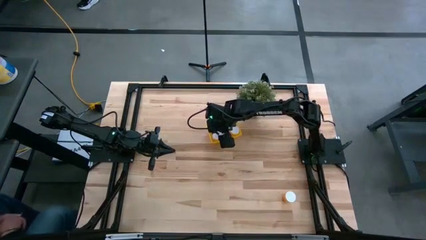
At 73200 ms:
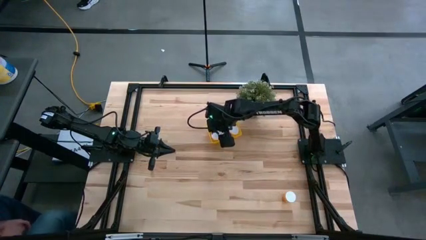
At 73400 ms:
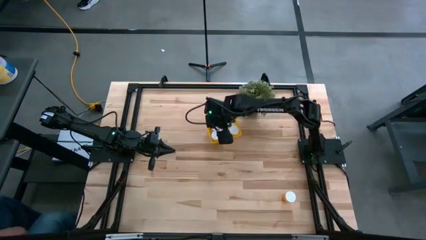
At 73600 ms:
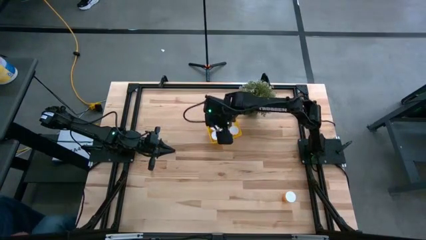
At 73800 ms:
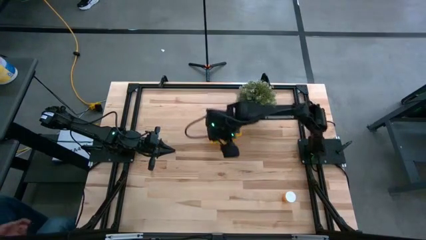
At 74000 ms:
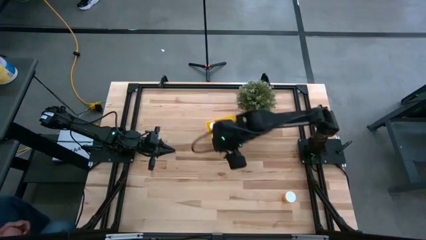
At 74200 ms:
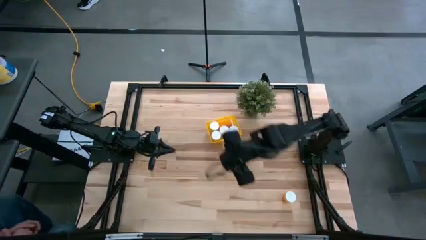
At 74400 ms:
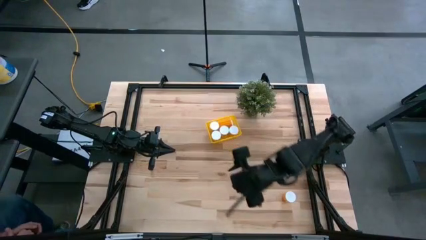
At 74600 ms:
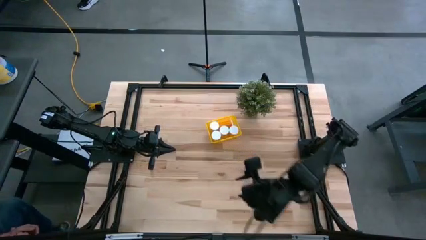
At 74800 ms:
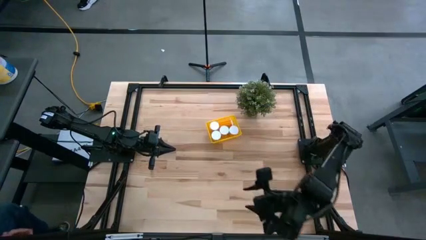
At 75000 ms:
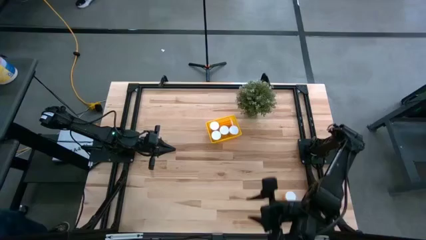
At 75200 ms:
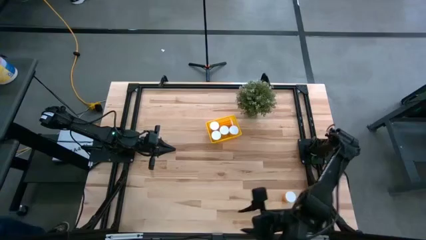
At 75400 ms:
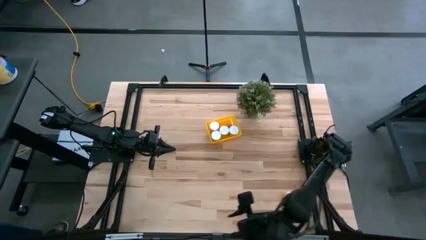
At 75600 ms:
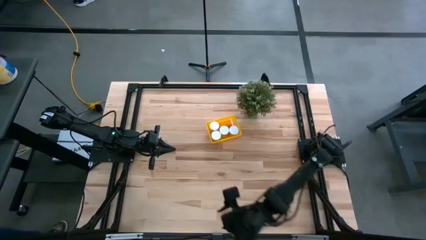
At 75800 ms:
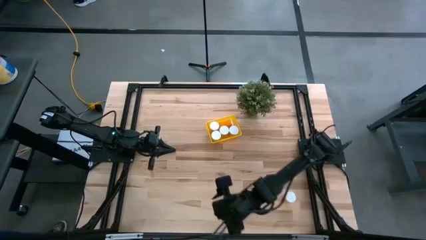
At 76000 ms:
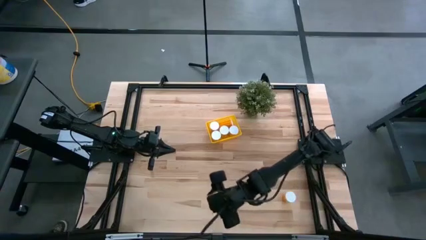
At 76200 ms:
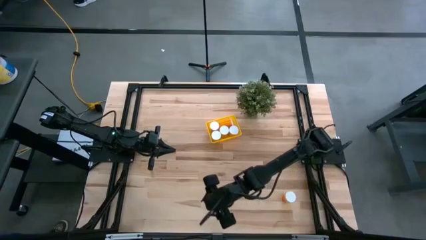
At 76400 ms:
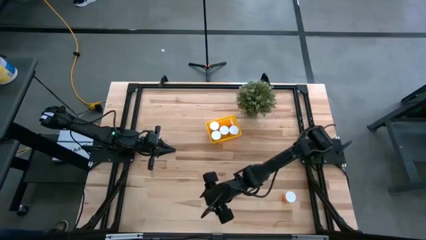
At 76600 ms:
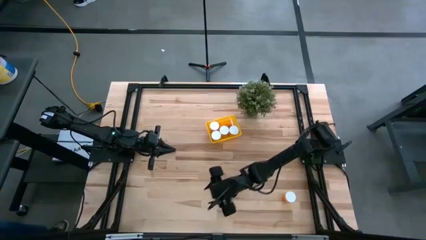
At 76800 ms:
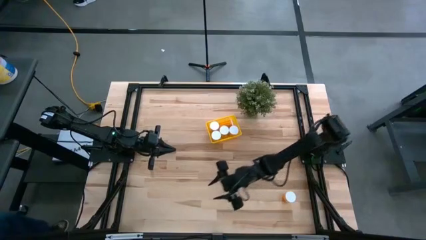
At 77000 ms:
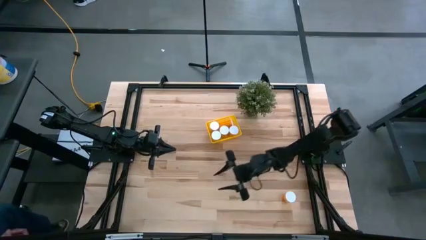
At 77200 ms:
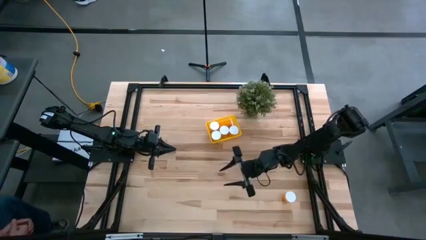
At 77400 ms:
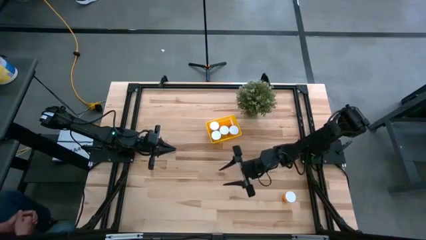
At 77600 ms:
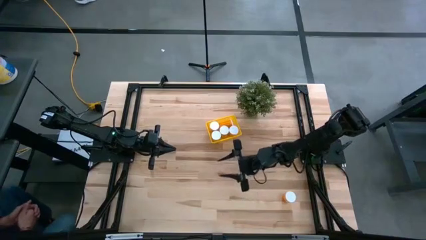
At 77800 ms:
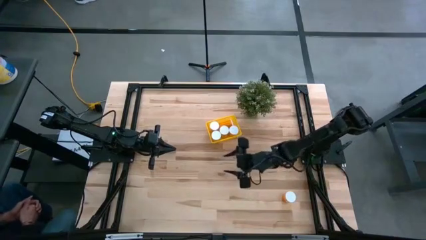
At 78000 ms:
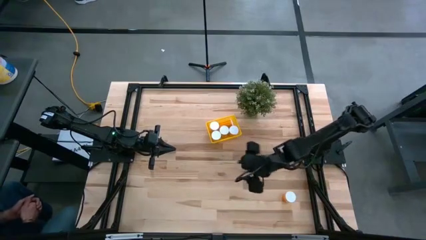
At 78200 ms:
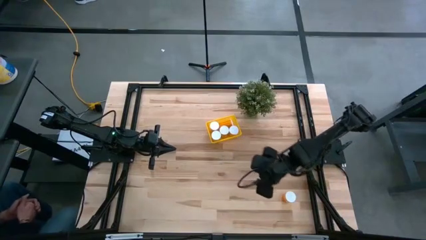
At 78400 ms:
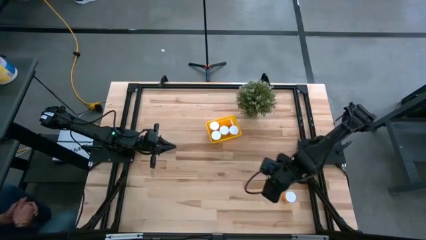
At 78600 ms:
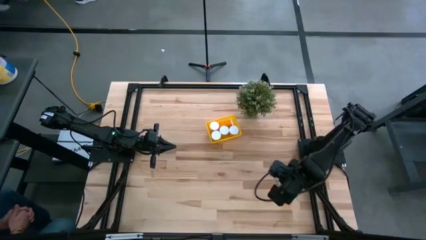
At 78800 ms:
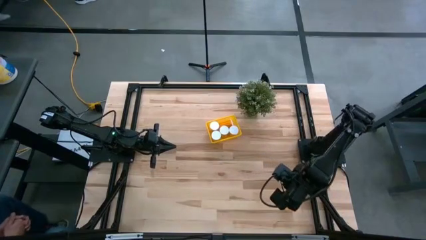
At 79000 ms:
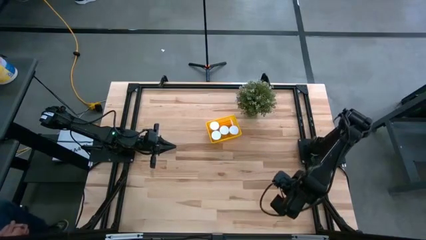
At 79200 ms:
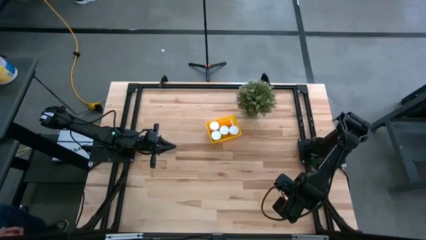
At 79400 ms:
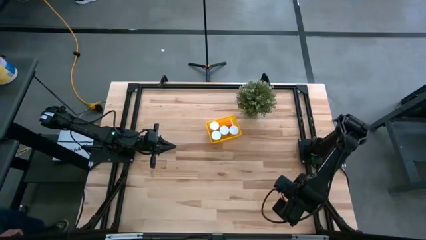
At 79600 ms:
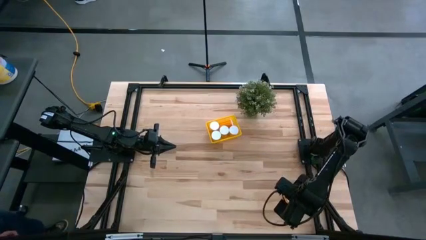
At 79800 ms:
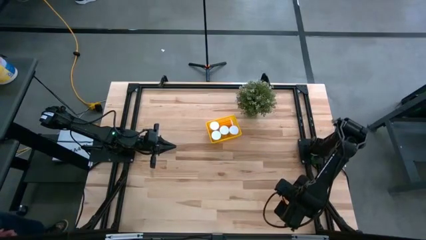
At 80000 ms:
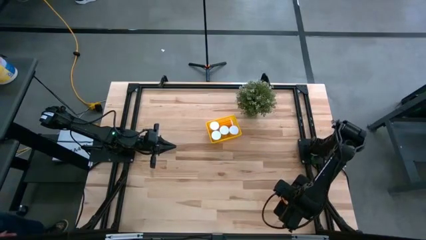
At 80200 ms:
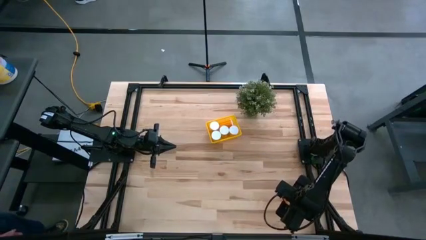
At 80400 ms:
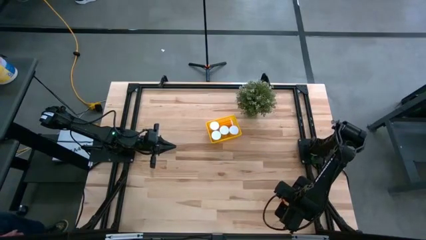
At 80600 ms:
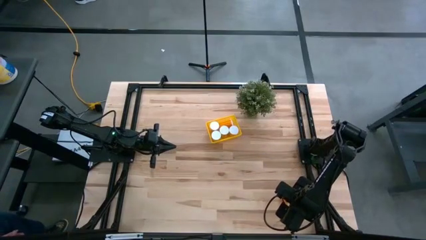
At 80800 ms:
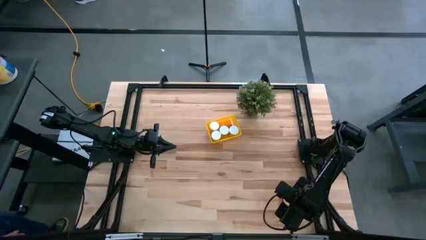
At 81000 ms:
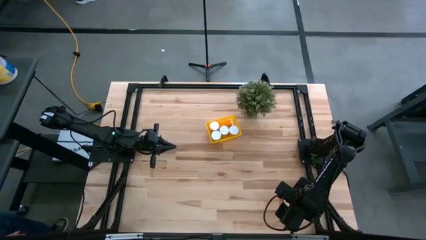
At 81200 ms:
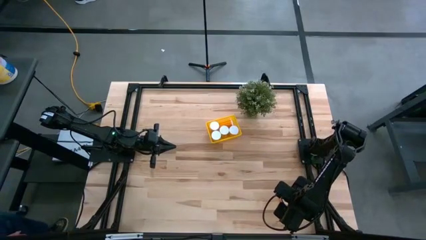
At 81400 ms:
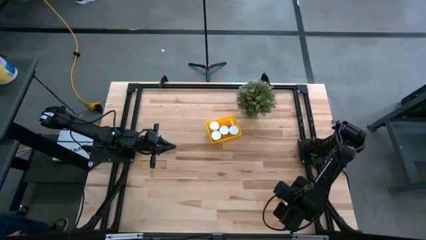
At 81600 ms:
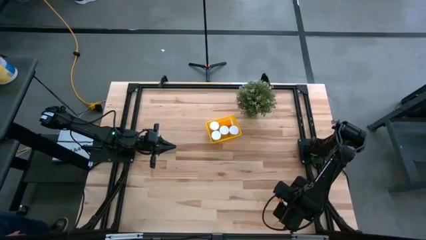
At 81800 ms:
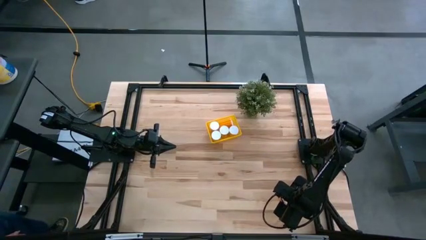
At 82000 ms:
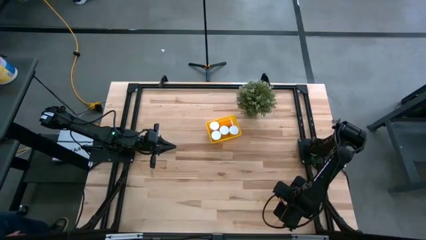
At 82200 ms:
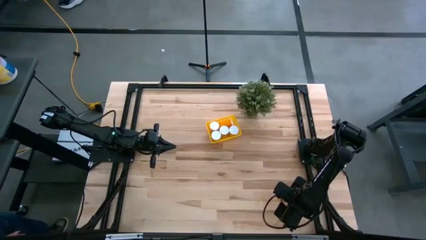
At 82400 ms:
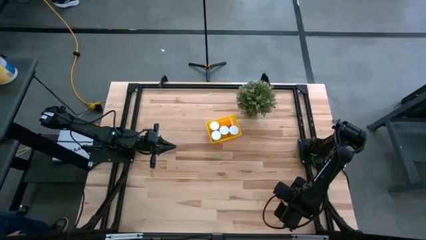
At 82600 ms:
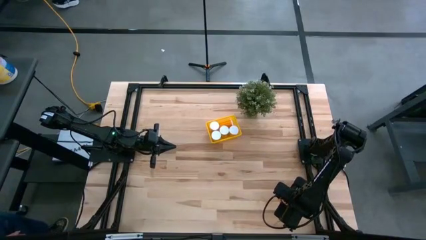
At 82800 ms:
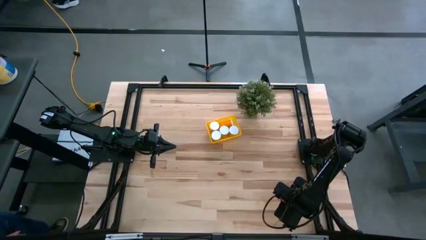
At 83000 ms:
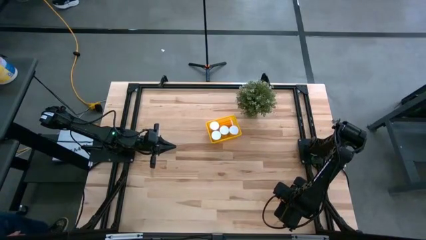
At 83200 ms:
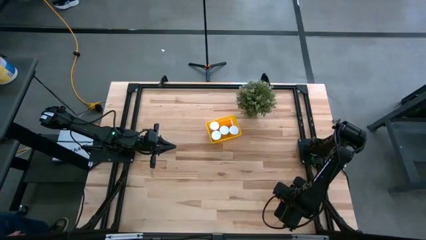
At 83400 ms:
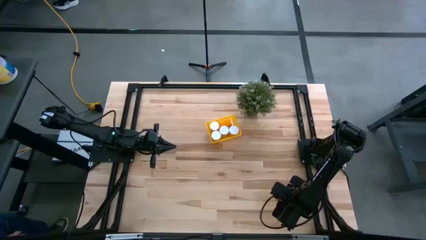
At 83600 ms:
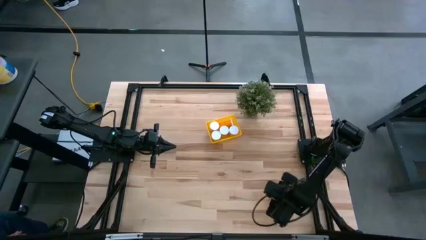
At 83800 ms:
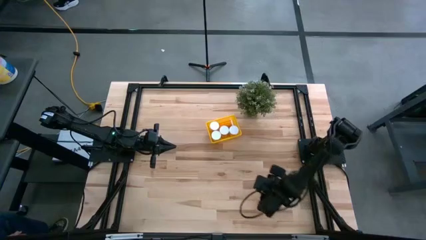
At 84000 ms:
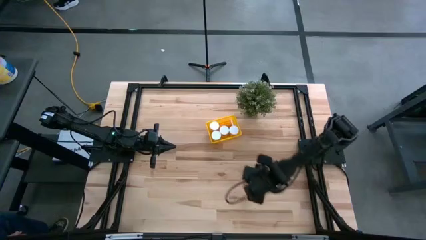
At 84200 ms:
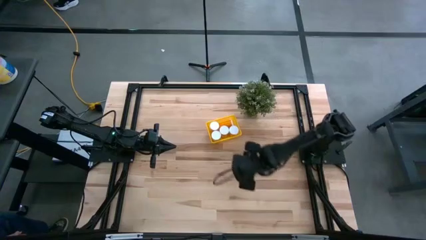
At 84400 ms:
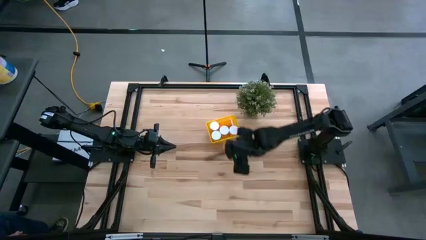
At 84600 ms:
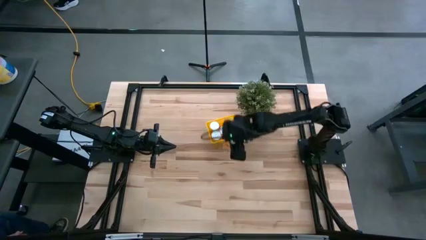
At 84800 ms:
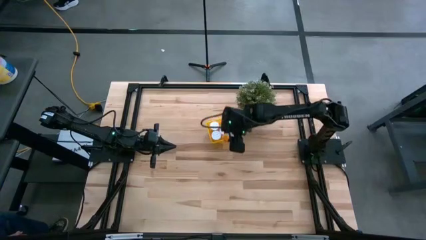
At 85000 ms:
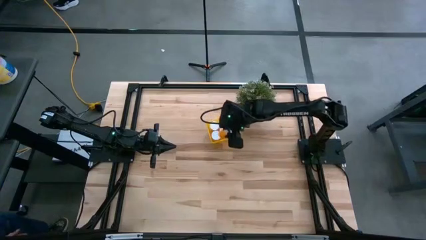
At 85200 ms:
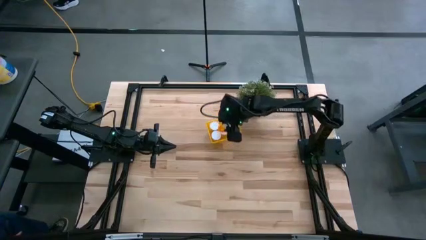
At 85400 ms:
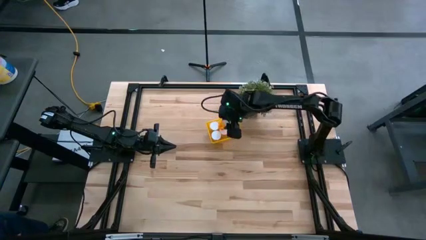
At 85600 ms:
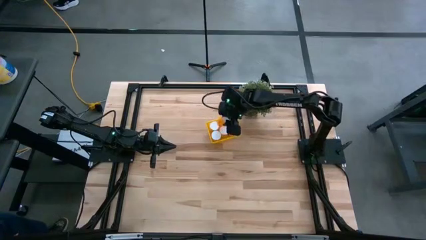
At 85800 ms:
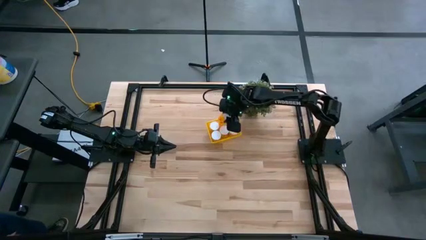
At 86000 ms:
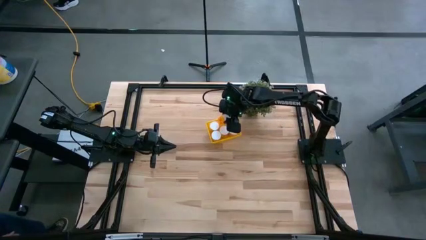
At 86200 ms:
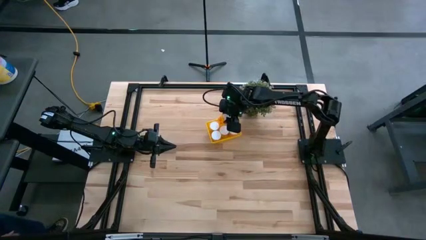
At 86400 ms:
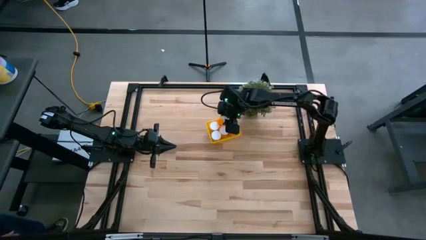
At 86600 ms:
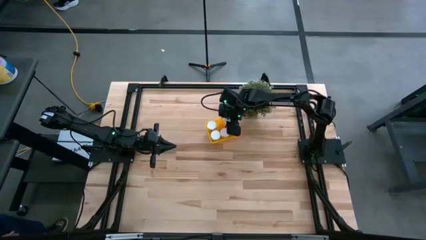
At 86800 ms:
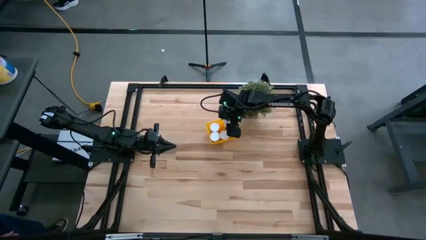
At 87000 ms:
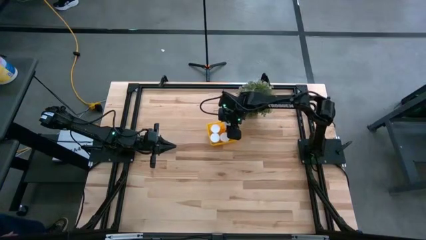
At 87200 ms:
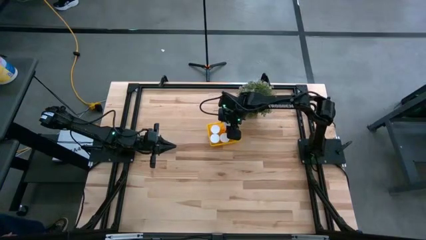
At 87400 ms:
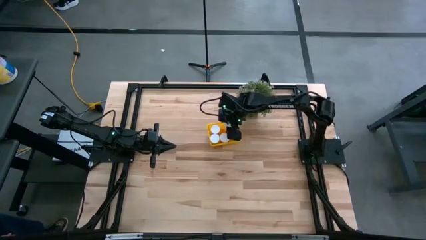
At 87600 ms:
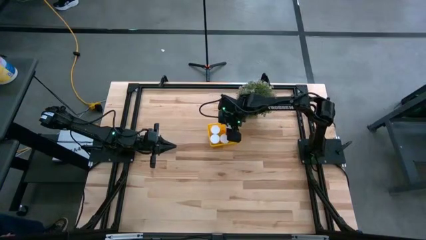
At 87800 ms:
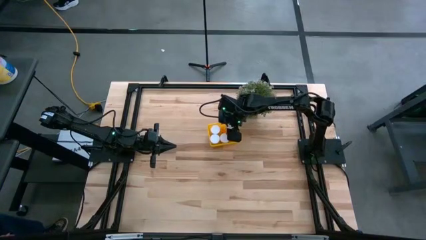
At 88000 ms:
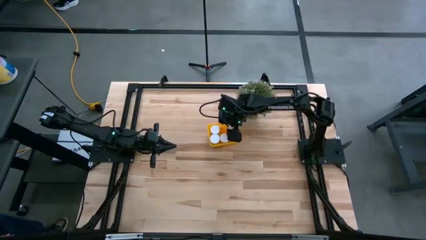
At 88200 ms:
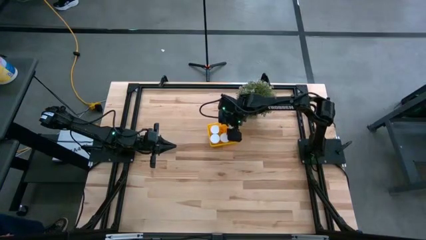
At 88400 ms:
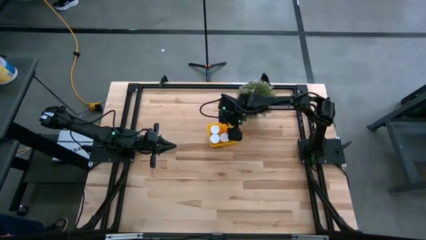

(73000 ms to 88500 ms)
Task: Pick and place pill bottles into a basket
Put the orange pill bottle into the yellow bin
